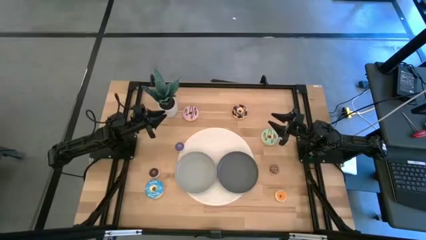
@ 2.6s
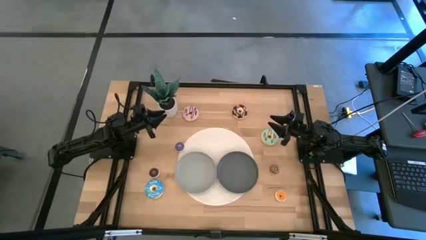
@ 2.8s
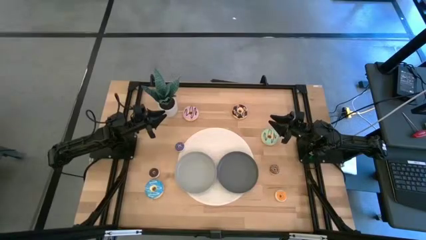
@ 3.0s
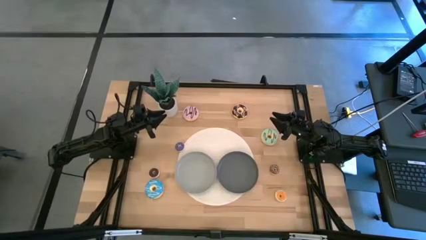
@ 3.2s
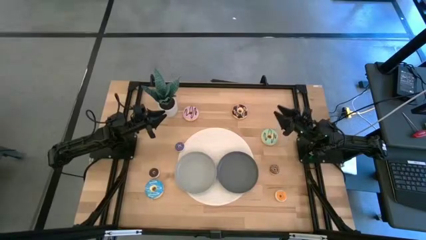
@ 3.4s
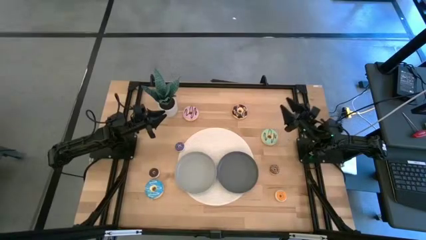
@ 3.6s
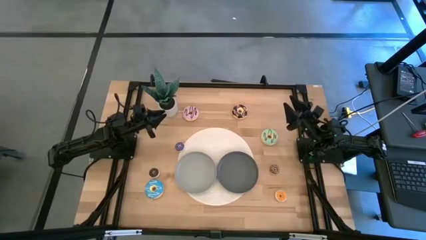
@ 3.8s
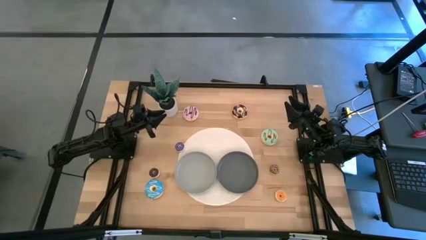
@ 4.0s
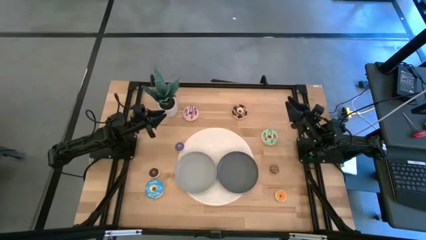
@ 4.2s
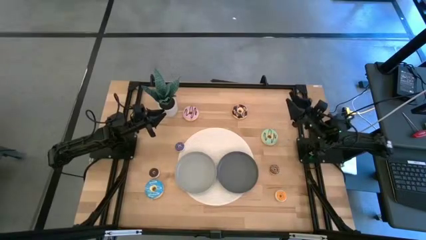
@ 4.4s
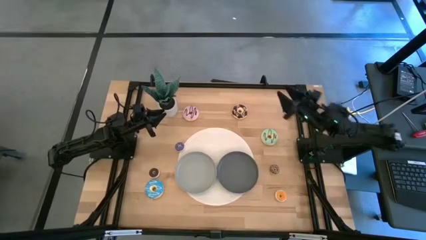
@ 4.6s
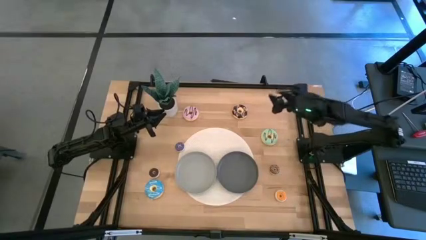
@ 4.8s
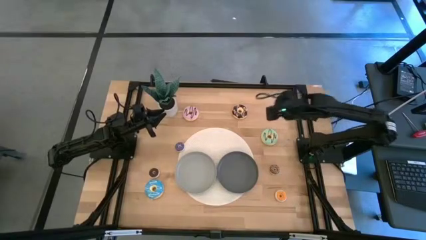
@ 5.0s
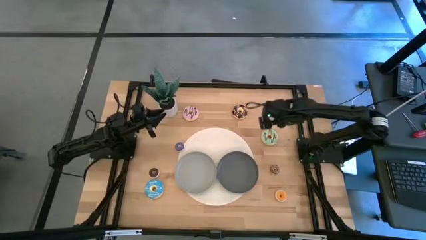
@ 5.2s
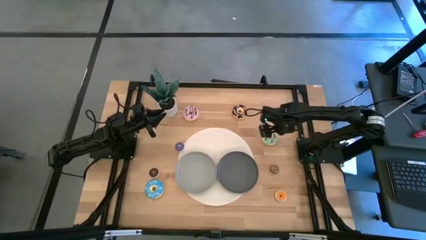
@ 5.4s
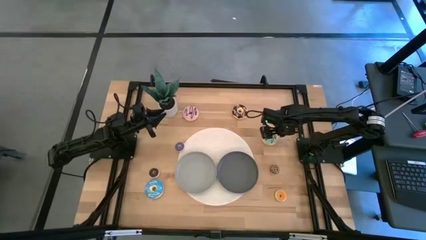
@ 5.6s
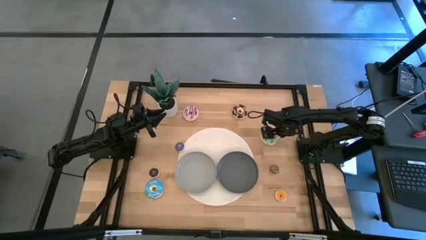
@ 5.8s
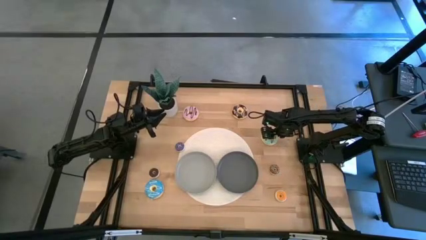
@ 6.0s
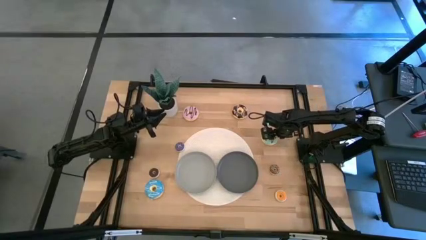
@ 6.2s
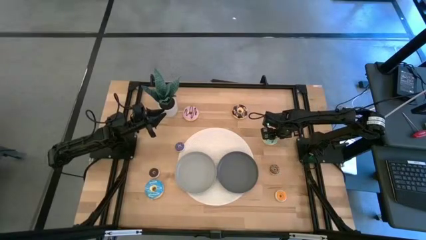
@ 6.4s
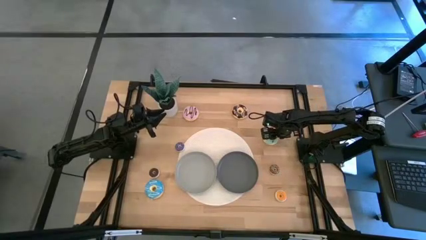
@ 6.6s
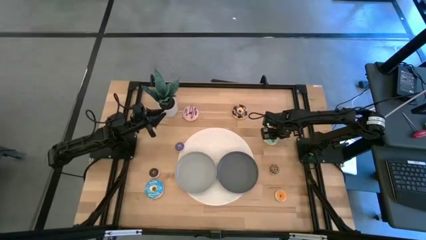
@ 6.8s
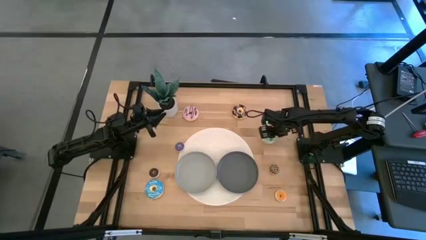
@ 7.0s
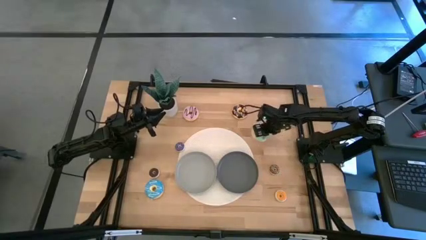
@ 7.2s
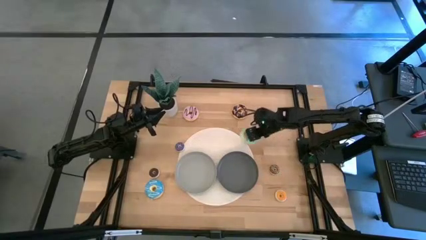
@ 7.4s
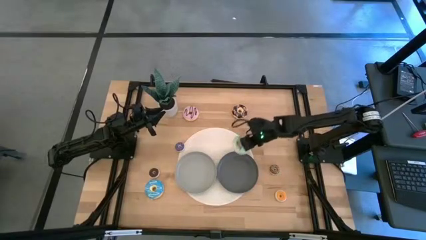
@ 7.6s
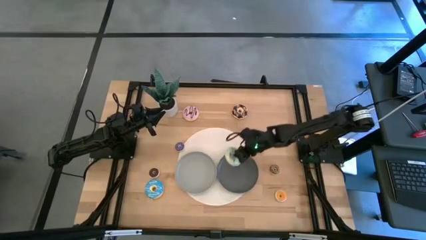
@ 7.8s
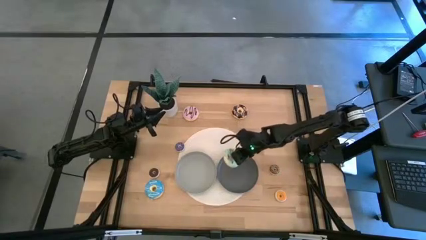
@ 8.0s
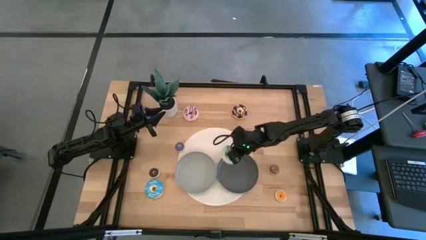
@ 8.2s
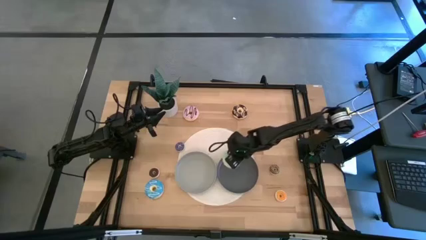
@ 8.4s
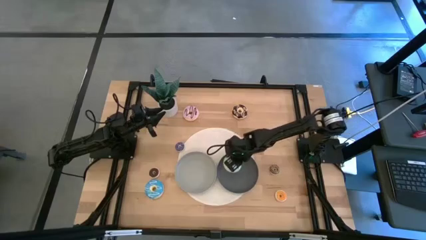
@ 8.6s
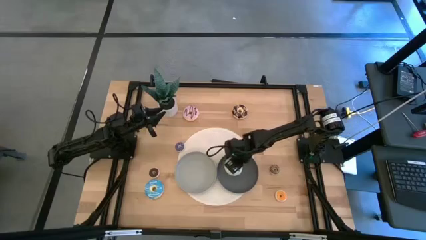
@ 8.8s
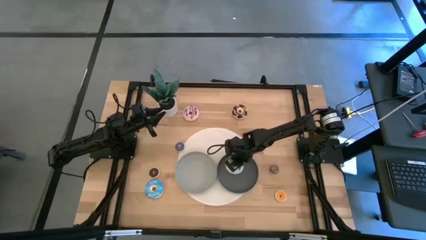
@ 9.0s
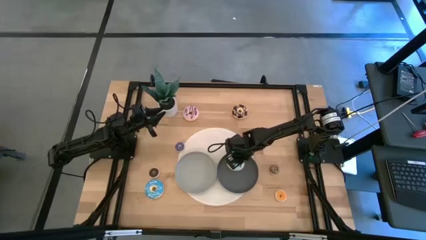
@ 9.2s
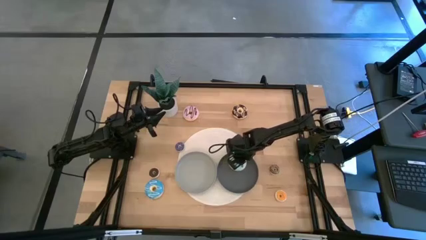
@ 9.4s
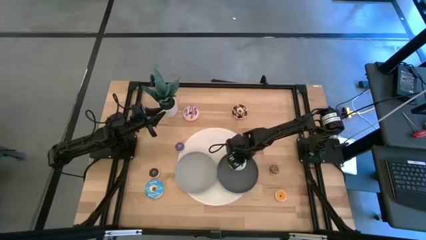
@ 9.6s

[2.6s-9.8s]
Task: Pick & Place donuts
Put the large blue donut on the dark gray plate

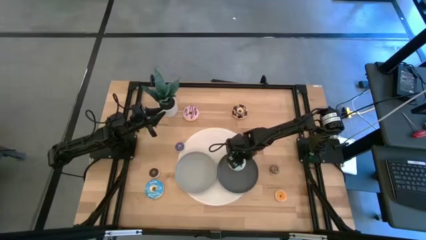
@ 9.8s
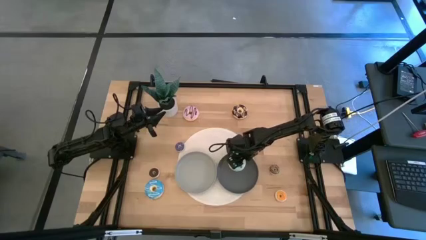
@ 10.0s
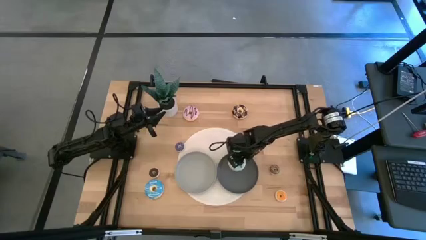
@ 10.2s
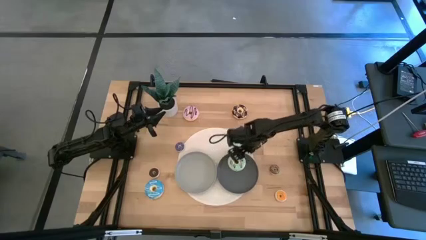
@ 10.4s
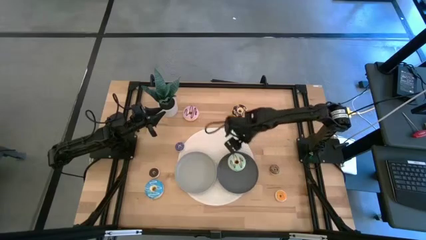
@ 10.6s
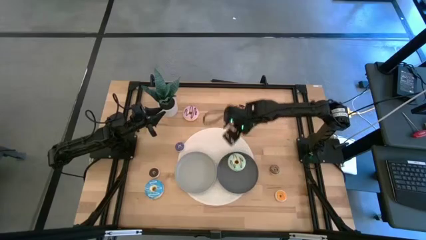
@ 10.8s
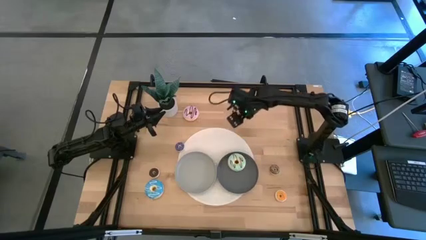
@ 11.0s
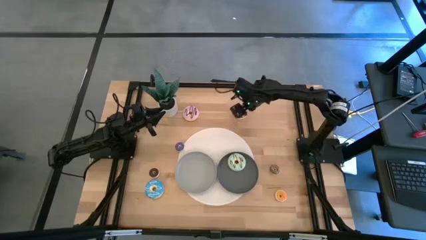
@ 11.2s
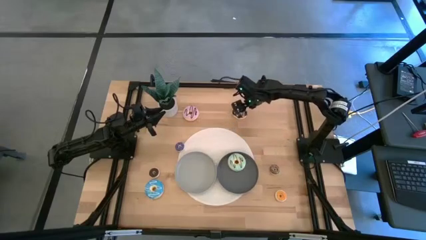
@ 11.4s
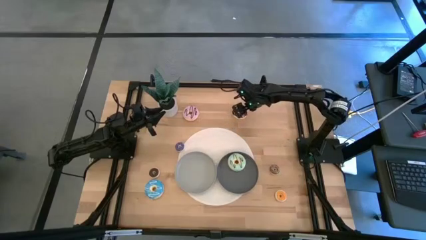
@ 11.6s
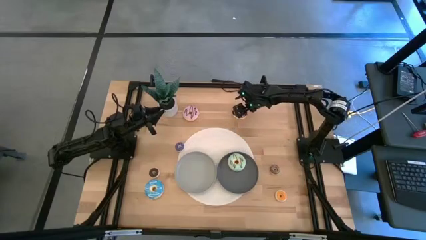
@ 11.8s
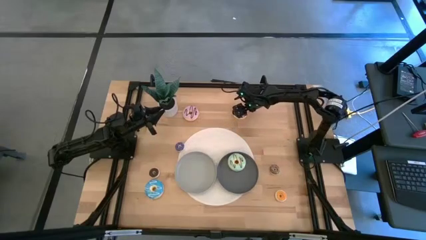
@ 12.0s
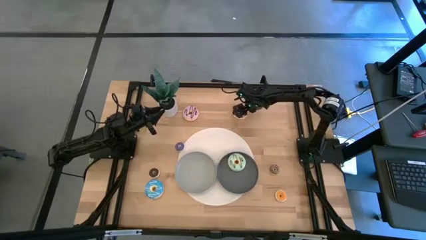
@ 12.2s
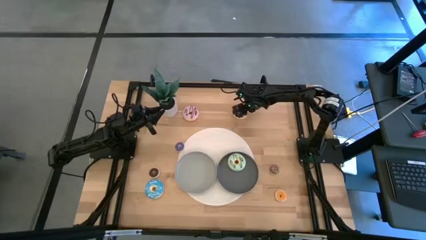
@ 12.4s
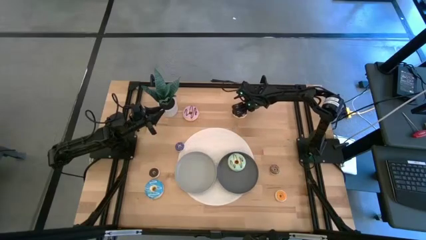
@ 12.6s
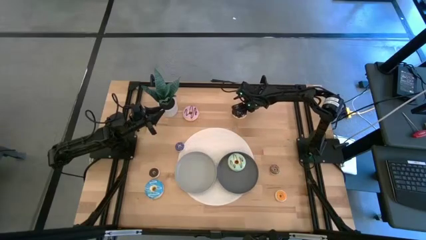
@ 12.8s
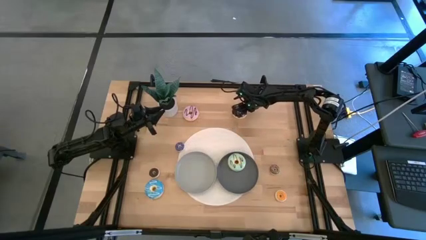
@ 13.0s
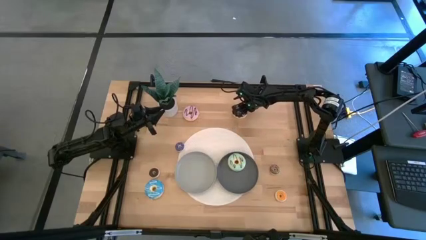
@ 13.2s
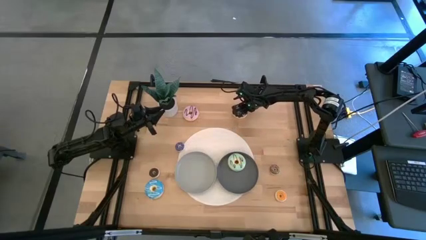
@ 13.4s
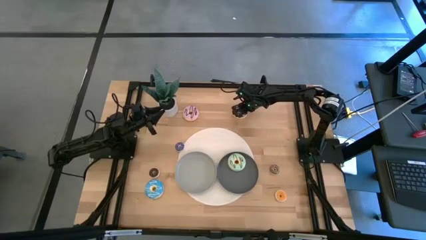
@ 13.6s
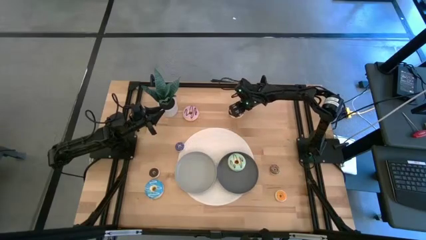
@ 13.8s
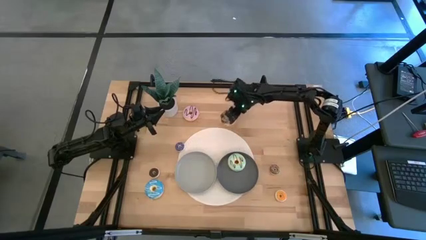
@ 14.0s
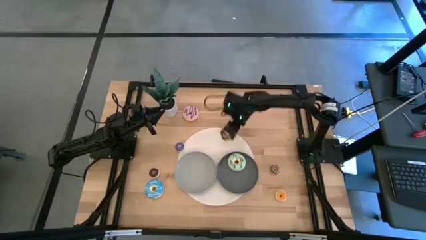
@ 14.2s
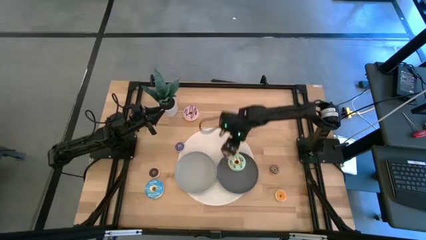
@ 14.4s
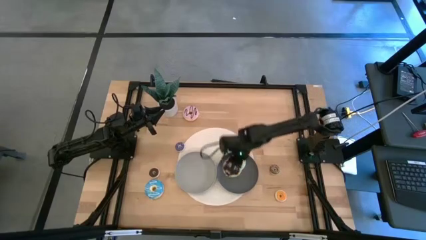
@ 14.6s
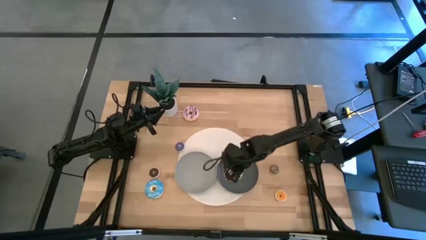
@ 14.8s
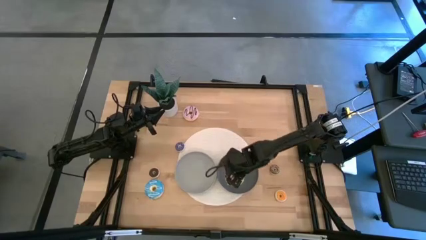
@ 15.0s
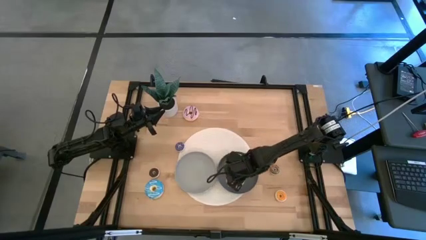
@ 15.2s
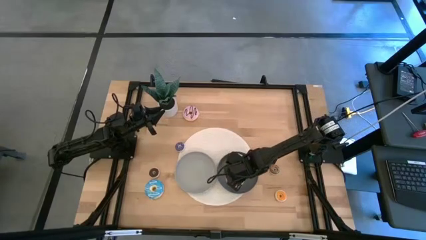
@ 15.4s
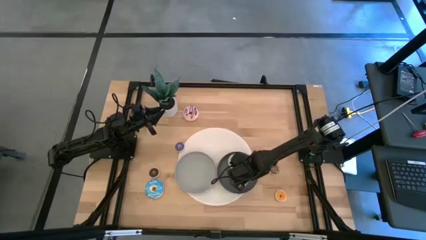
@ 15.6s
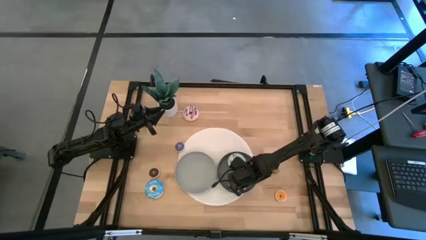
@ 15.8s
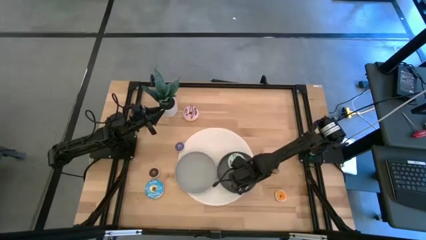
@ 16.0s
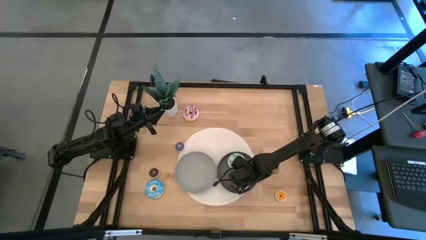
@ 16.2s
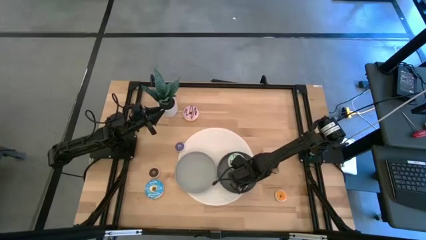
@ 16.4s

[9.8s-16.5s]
Put the large black donut on the dark gray plate

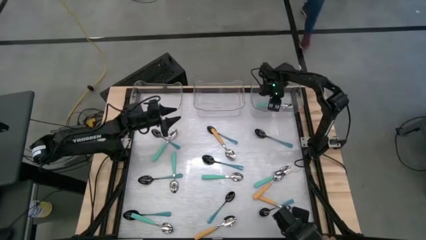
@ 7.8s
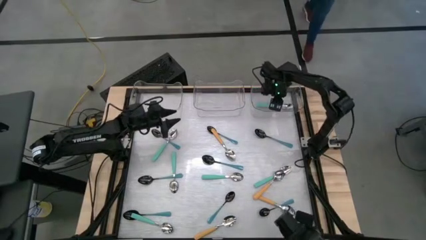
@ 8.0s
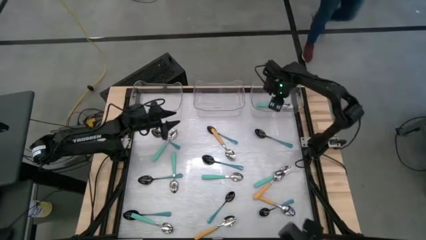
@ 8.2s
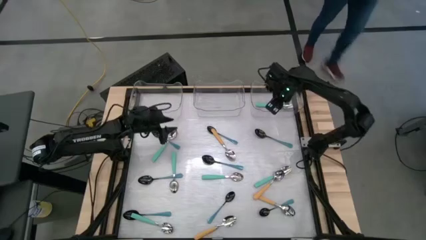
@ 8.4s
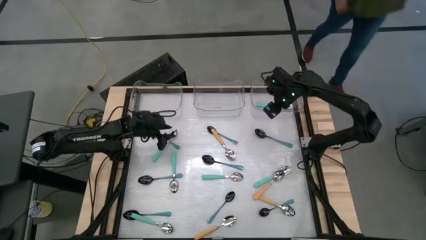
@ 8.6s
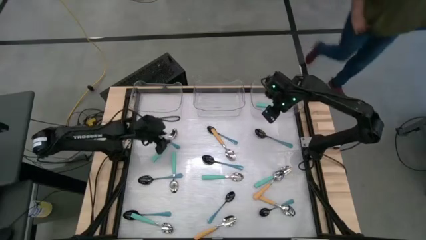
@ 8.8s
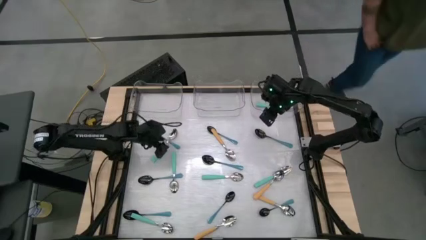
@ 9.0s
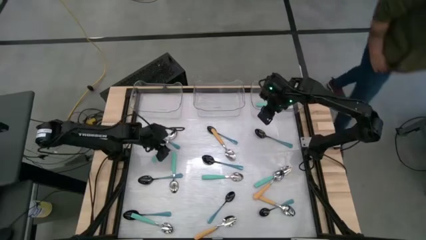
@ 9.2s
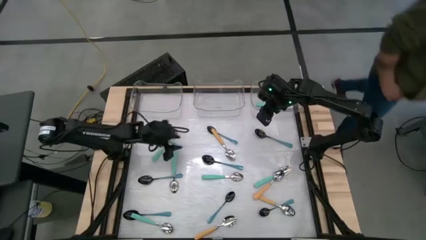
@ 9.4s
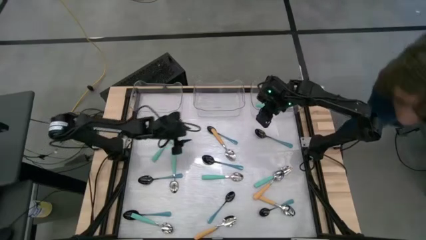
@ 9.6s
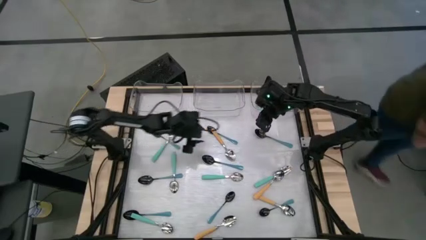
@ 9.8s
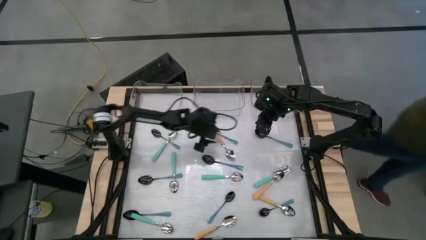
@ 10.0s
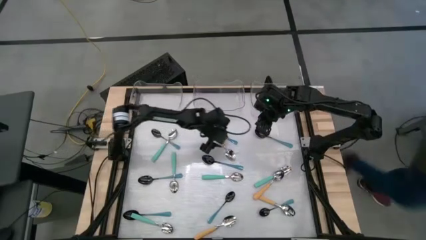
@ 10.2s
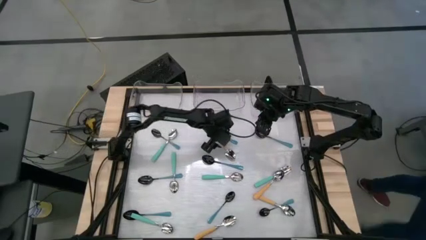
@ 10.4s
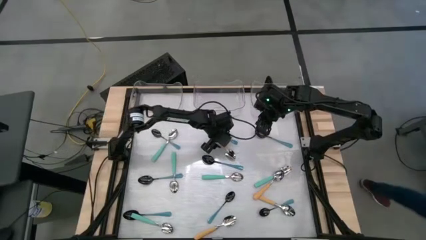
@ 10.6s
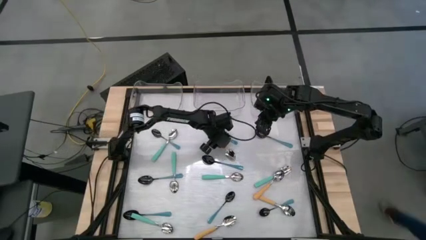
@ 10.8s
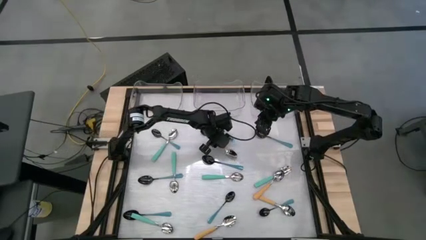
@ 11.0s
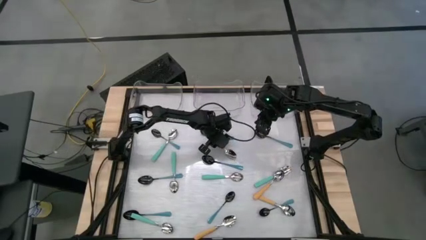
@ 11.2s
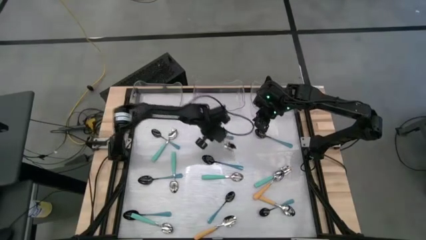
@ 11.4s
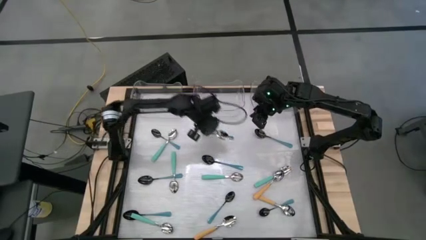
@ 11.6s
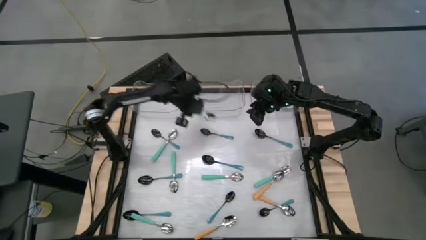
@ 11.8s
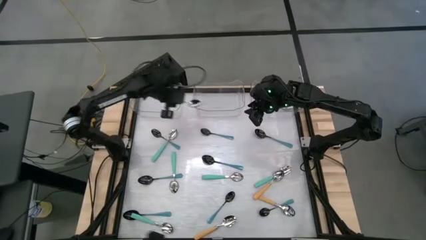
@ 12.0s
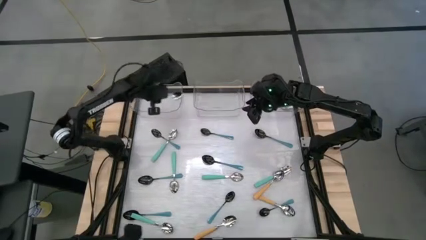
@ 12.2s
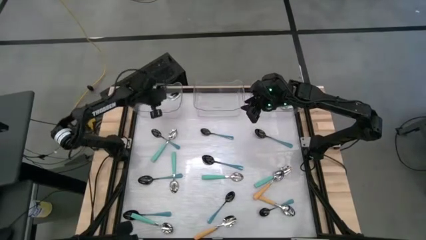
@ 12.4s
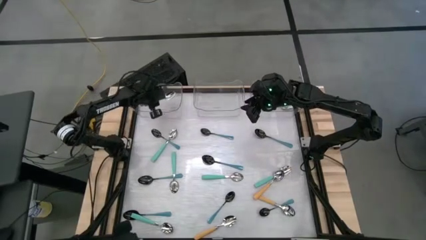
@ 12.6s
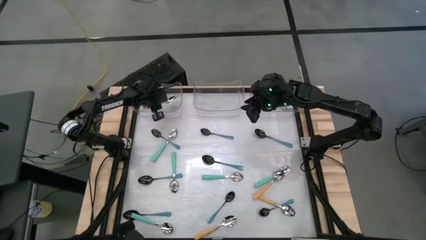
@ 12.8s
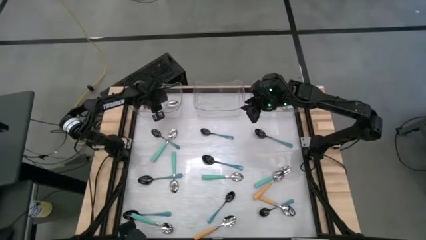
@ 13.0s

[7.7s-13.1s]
Task: Sort silverware by color (type)
Put the yellow spoon into the left transparent bin
